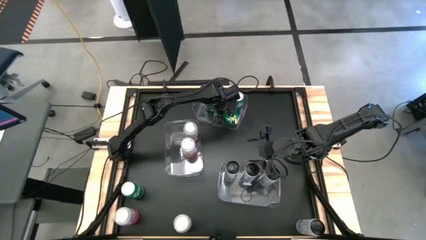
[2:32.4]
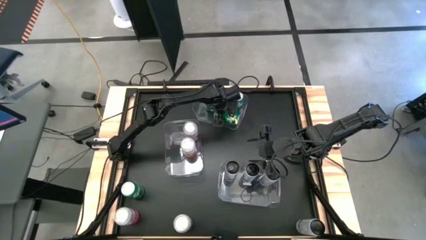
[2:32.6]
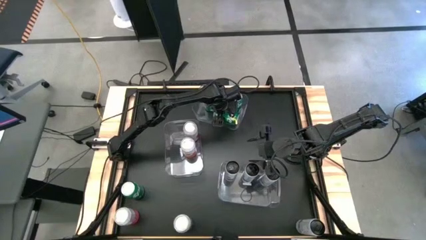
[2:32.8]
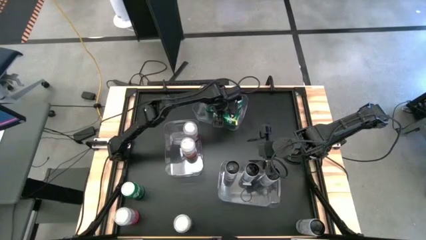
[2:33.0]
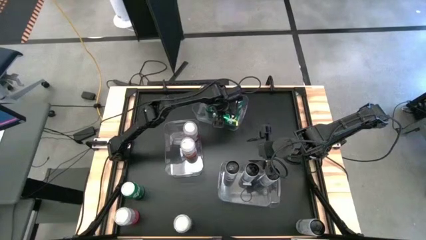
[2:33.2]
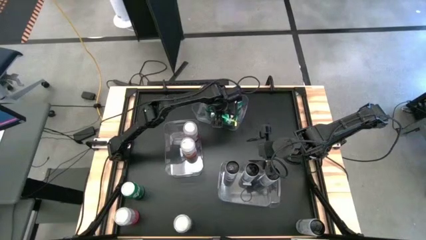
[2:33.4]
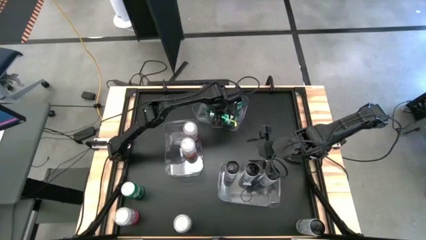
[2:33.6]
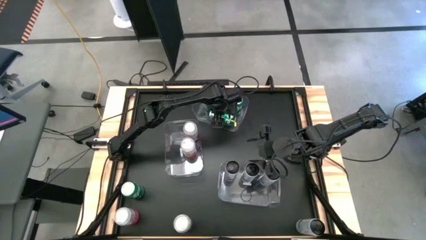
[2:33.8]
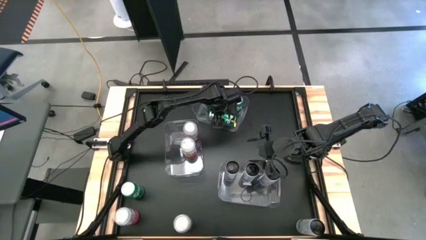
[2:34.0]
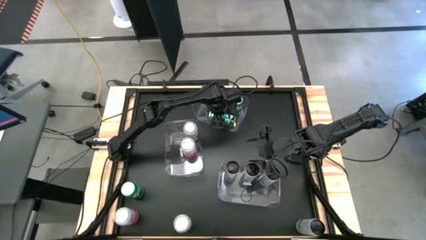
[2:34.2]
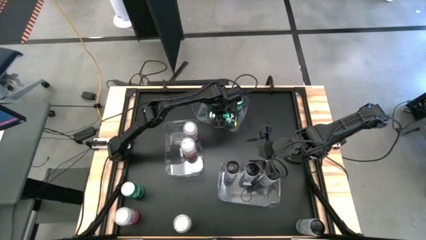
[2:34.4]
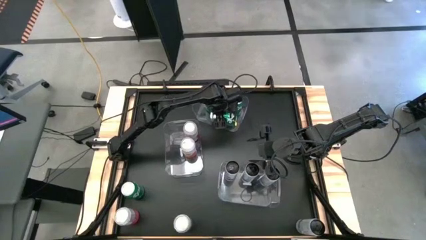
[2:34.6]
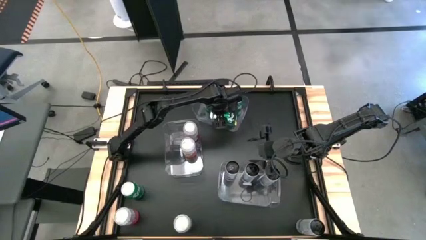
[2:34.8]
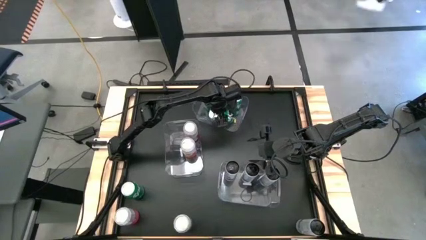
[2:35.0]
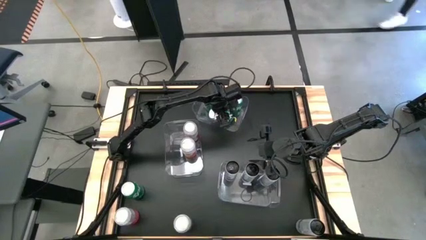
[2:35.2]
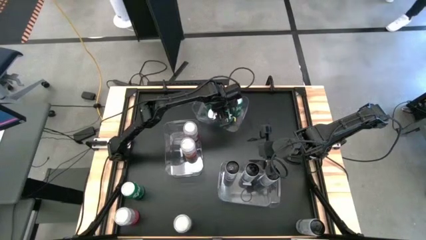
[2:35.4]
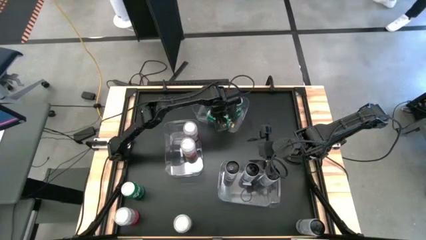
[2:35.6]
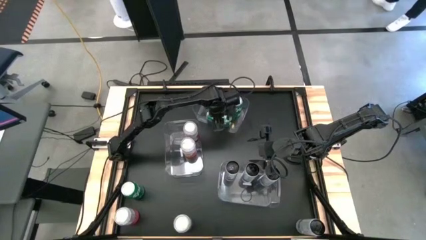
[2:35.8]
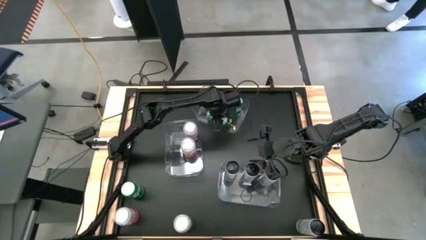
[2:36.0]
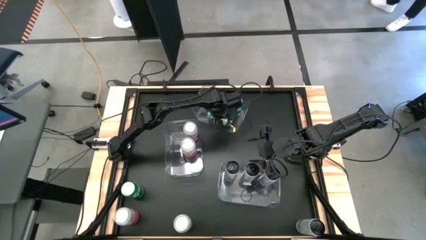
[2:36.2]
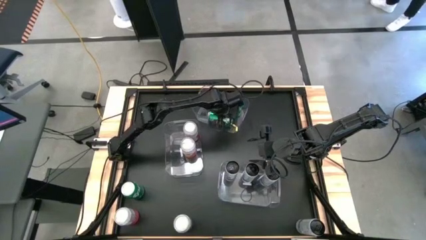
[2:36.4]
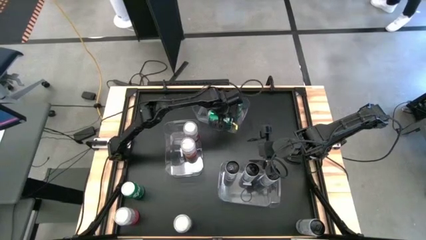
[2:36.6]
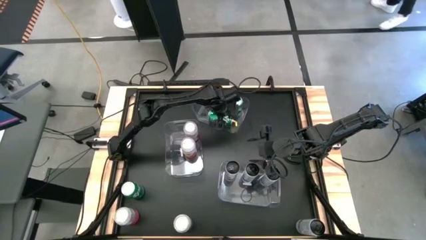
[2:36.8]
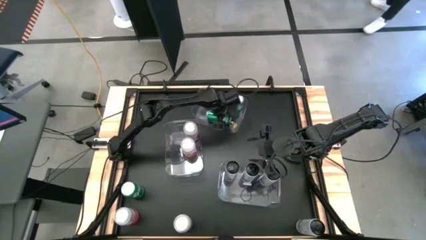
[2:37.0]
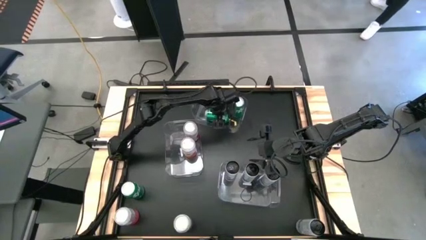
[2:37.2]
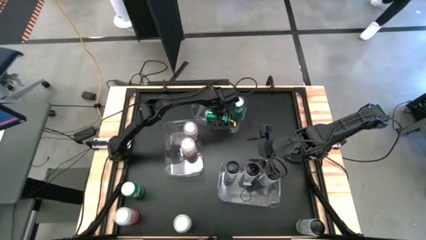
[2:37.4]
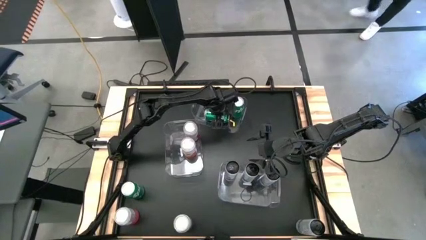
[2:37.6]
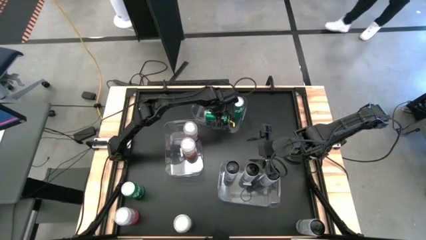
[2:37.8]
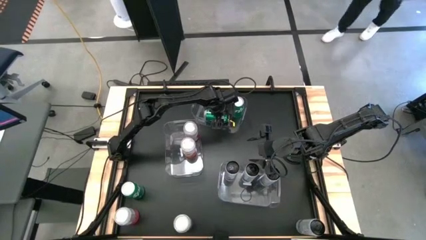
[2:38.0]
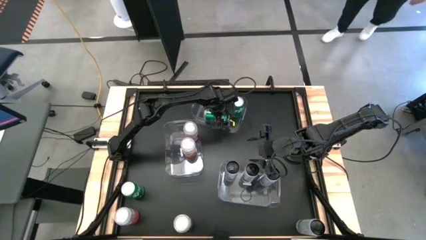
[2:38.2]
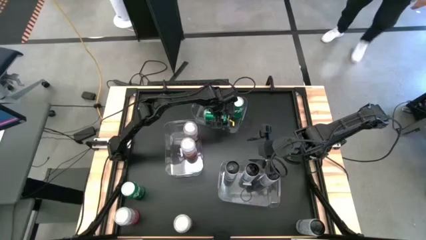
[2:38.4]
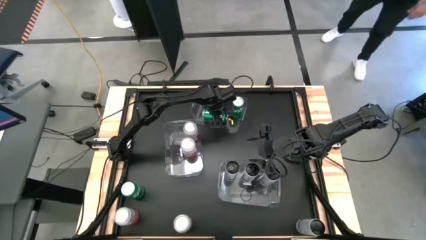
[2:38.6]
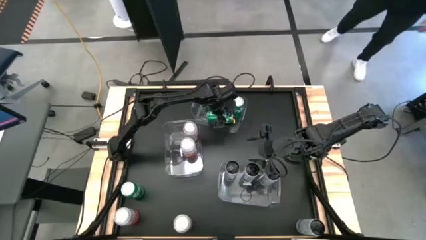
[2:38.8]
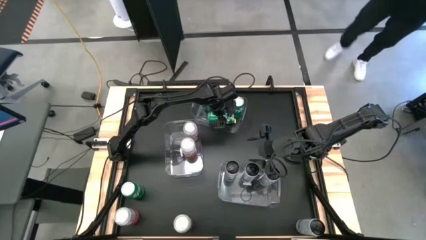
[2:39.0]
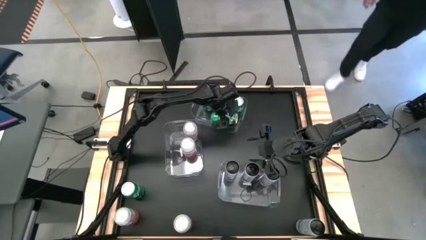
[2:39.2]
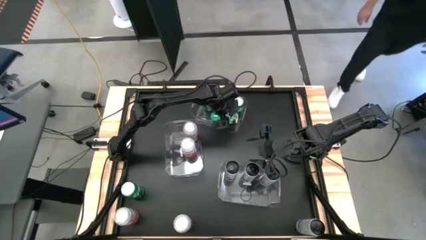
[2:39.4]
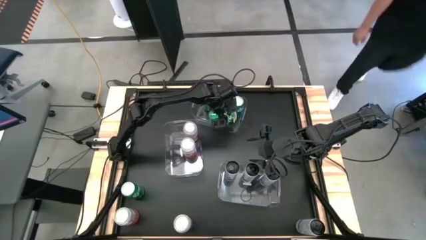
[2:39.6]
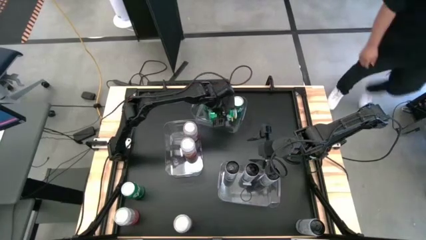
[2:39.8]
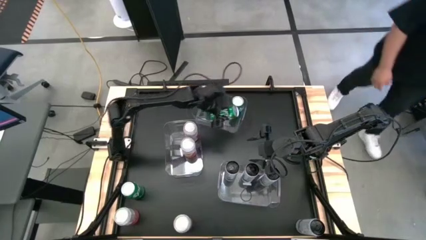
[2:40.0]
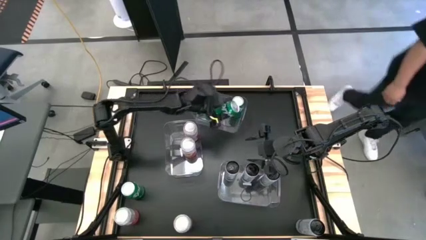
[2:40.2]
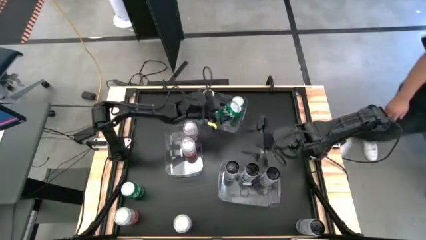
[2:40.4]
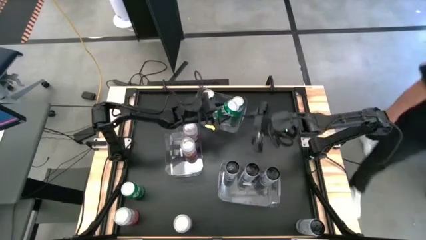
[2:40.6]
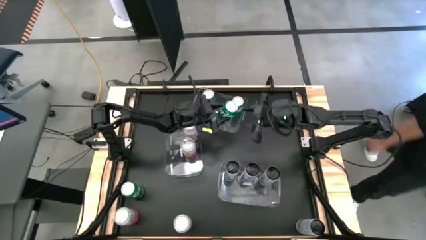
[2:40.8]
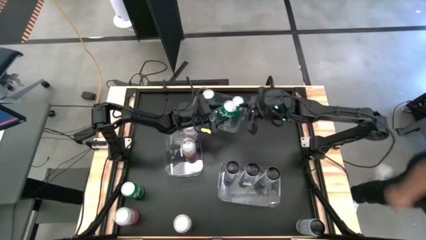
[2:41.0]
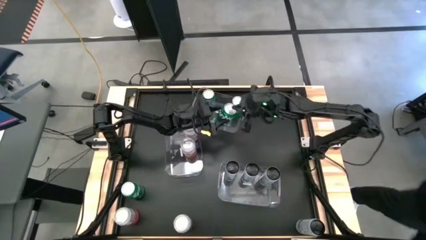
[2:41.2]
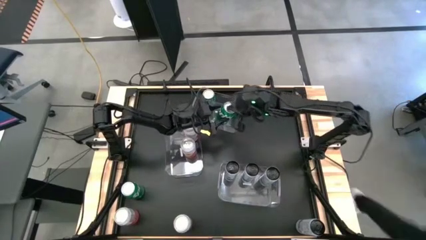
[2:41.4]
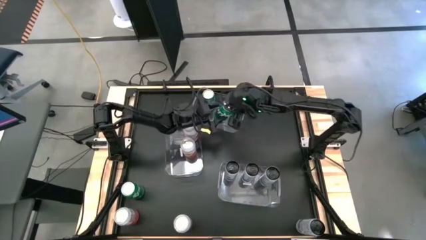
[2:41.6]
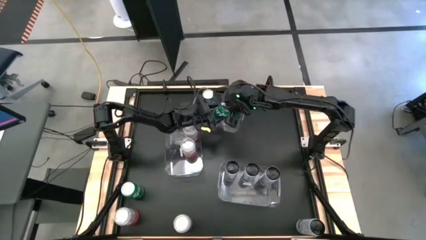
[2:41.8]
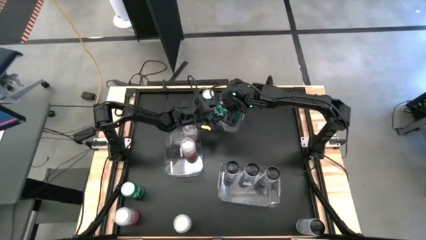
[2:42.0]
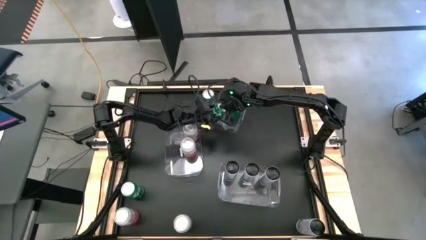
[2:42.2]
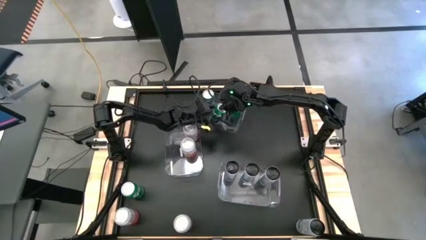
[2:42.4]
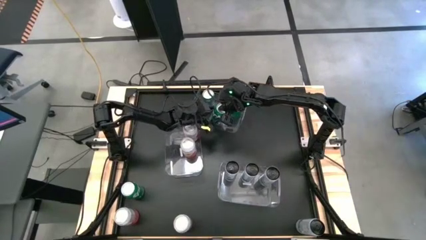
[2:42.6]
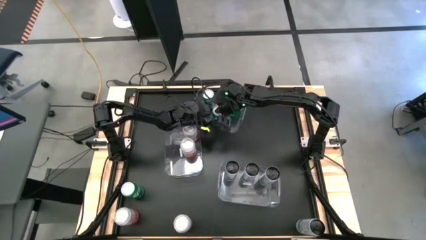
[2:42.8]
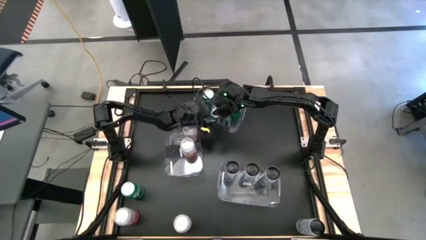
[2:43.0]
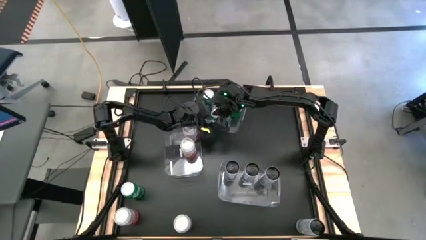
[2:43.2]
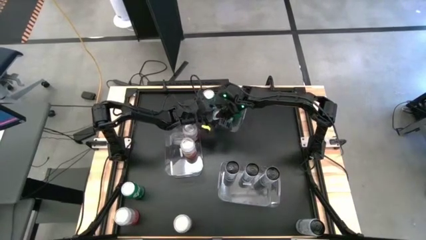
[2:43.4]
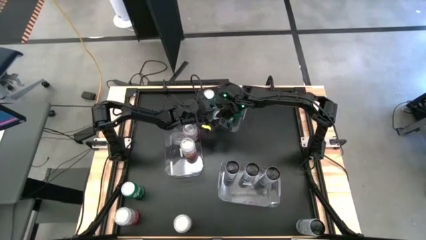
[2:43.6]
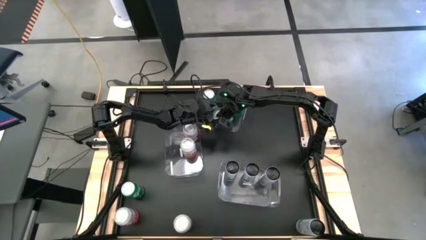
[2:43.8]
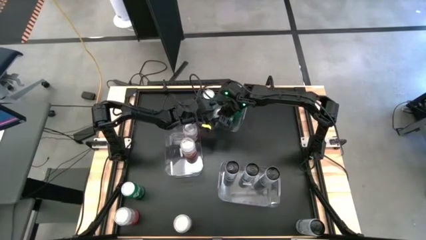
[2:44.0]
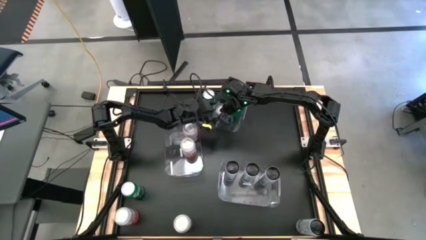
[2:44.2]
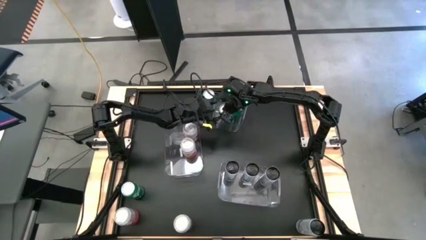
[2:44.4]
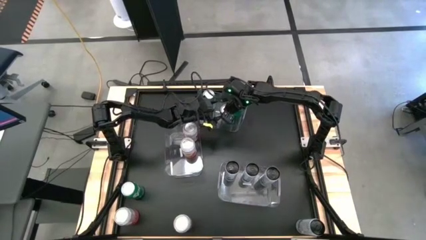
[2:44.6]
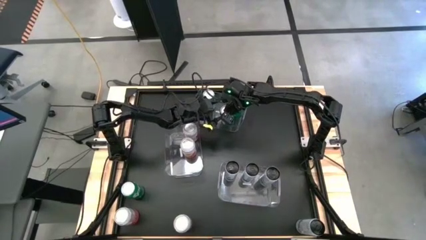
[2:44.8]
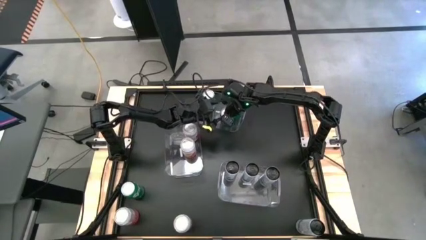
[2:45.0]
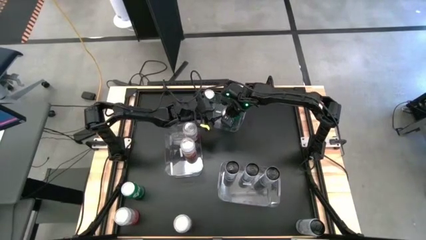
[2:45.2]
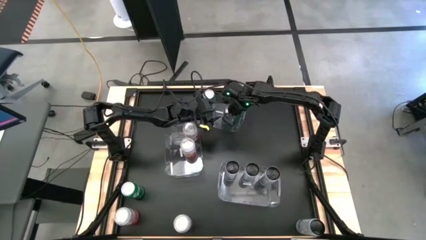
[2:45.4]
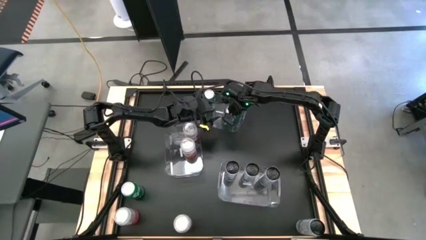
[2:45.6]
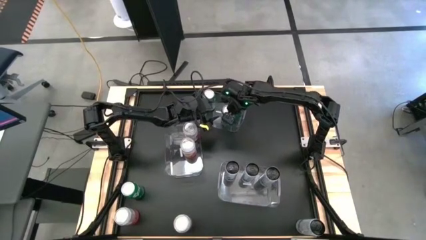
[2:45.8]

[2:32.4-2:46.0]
Task: Sort soda cans
Put the green soda can into the top transparent bin
